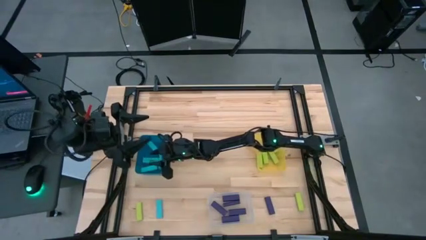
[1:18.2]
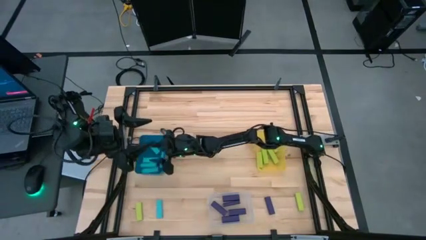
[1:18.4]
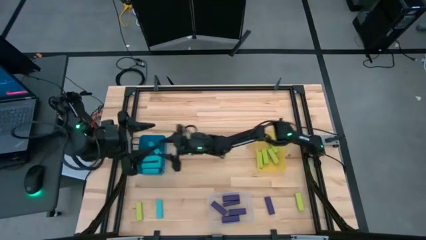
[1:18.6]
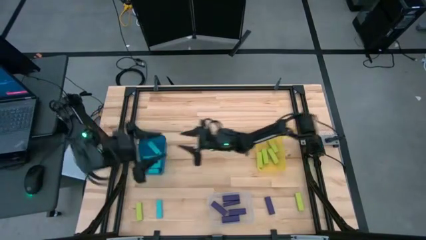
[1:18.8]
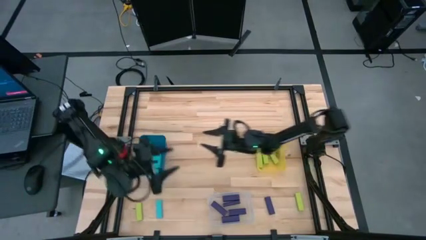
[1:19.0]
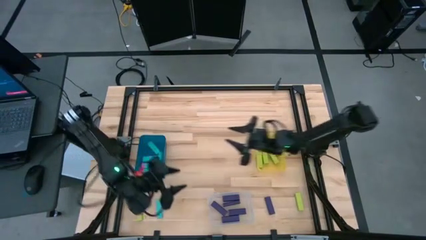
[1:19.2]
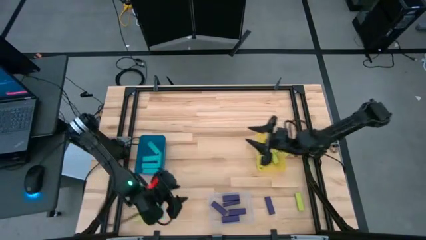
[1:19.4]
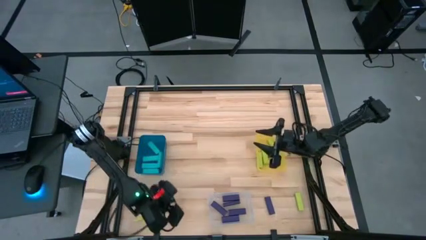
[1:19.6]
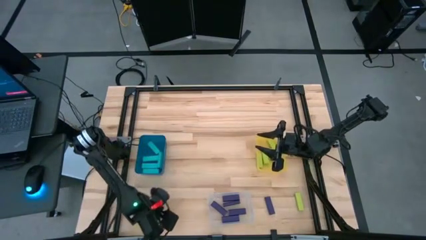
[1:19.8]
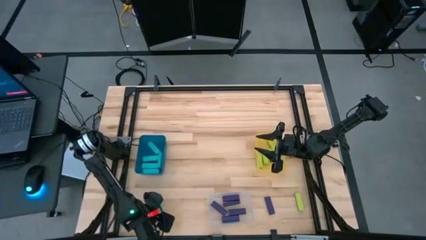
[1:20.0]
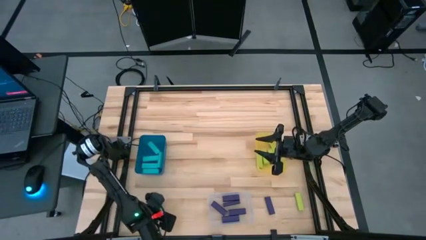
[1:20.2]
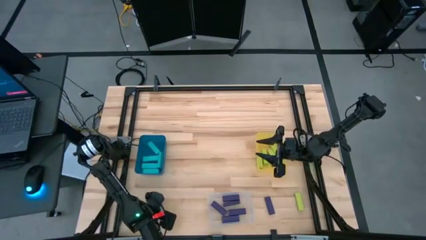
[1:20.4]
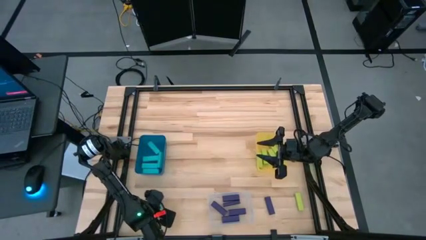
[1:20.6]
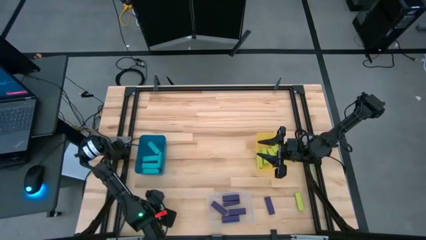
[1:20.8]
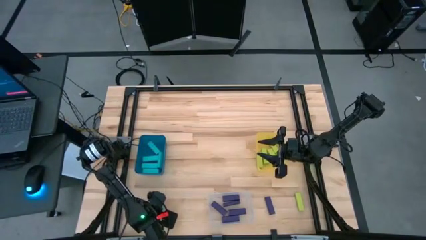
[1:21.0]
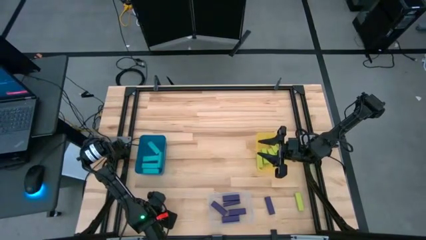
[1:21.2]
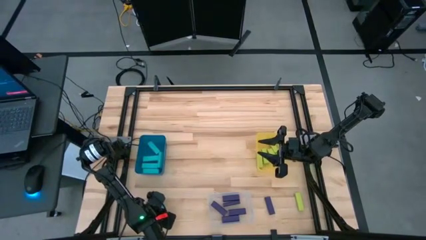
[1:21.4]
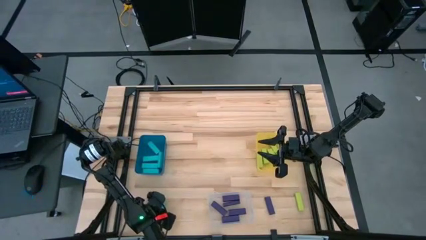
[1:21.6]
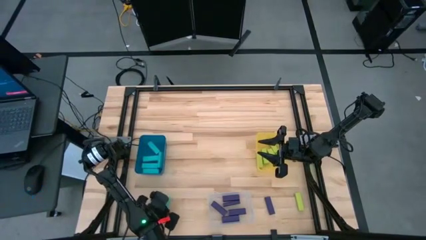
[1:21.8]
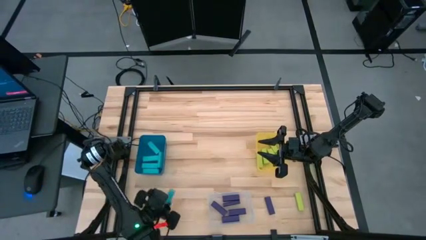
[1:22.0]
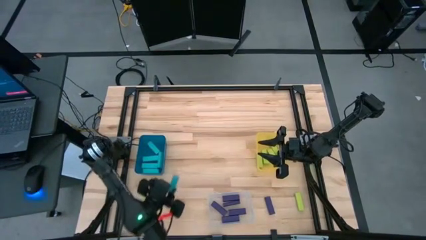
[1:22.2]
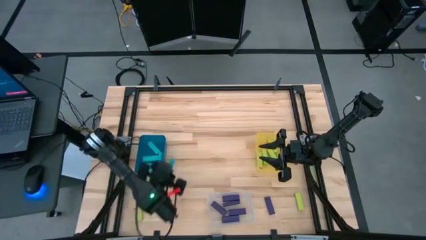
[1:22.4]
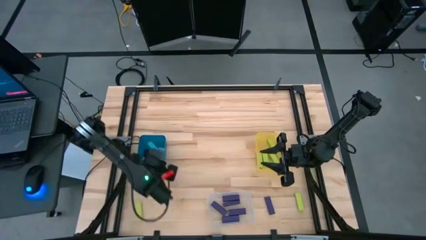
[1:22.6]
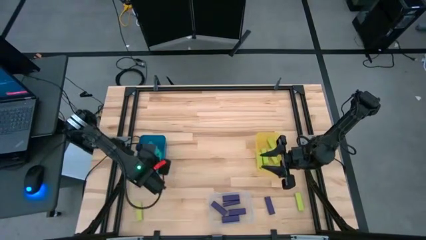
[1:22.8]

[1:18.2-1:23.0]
Task: Sort blocks
Put the light blue block into the blue bin

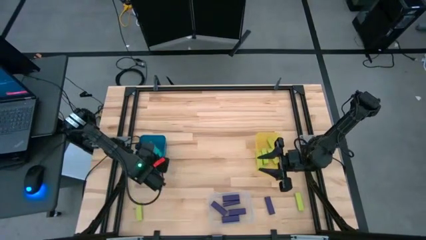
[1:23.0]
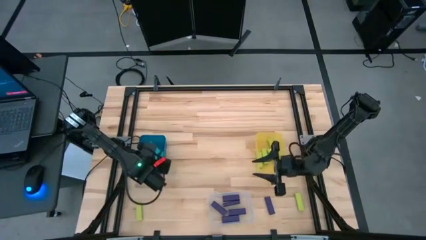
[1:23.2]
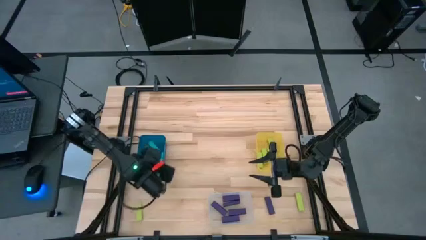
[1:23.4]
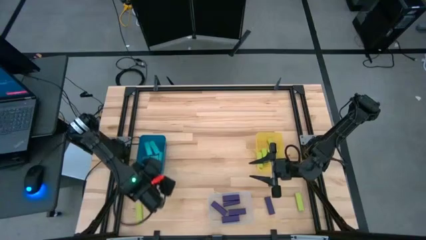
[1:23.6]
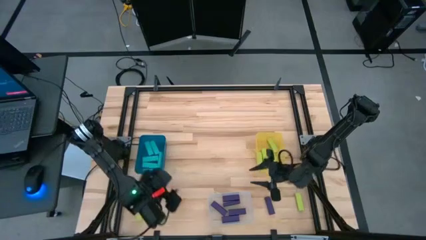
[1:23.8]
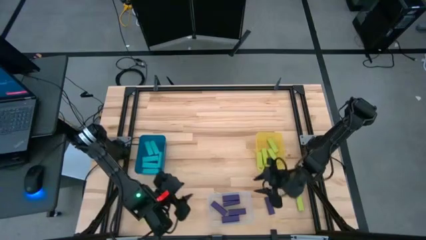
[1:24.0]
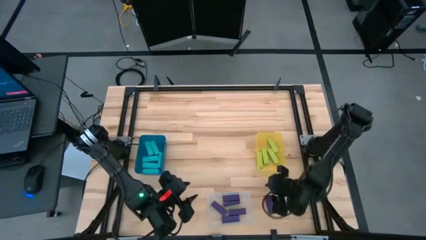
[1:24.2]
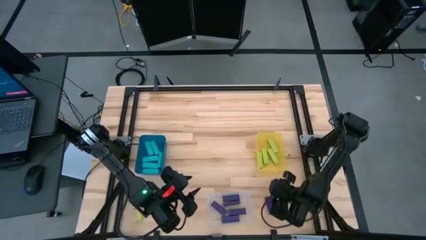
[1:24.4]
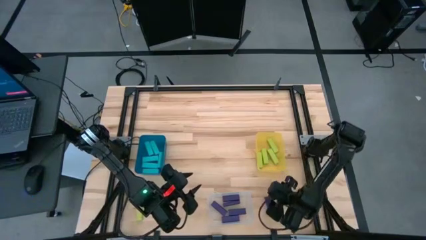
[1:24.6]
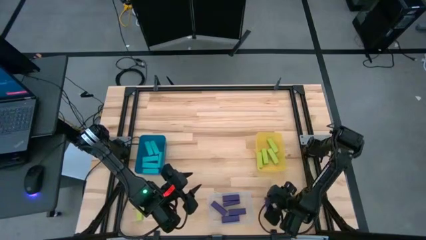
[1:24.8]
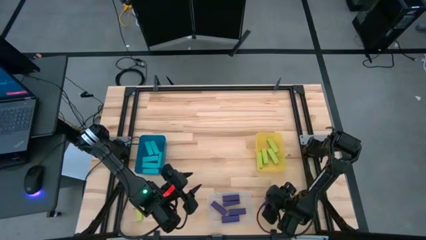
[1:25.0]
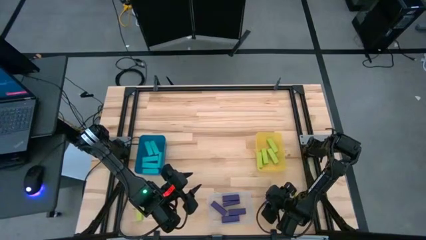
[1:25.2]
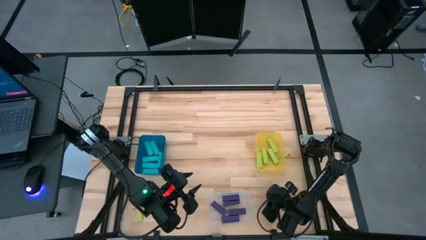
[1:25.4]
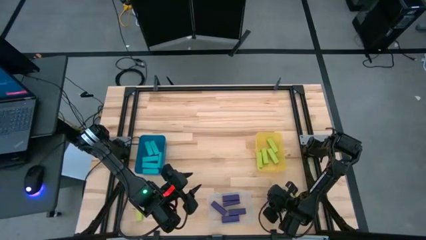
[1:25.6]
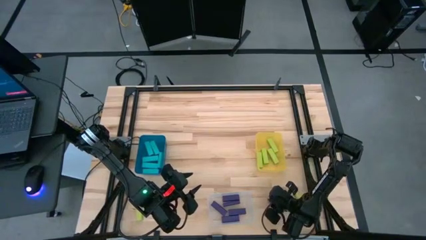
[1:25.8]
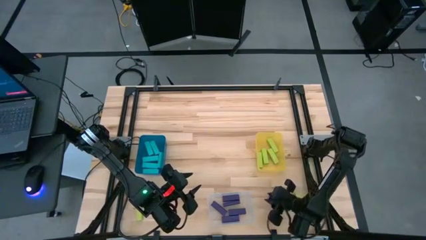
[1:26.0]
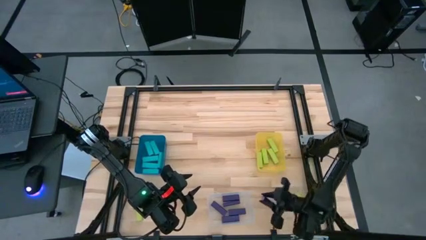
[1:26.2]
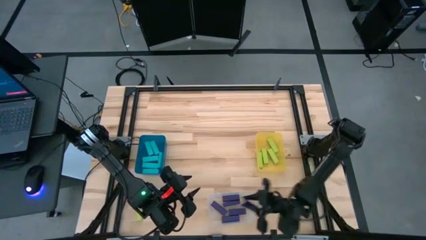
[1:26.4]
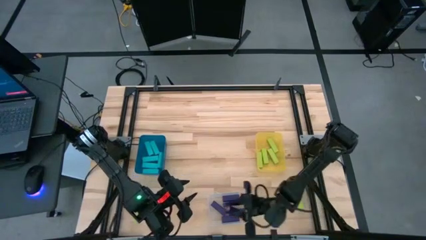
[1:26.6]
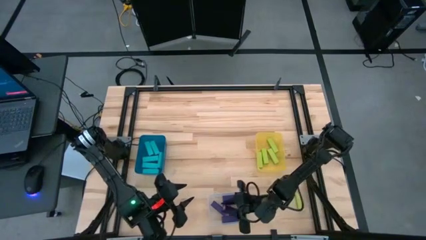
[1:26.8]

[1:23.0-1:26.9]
Put the violet block into the transparent bin

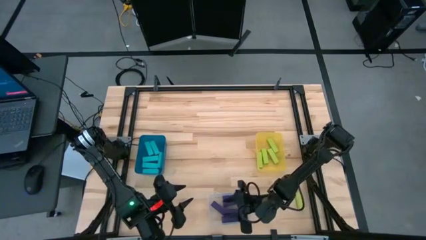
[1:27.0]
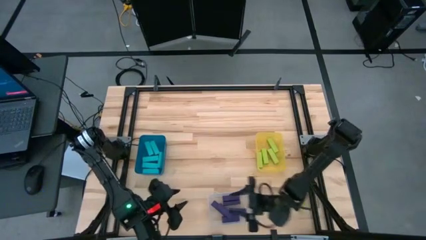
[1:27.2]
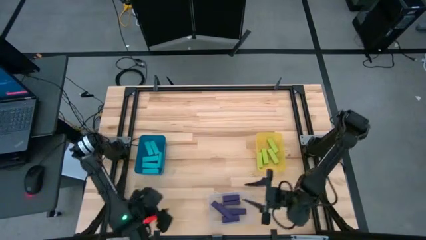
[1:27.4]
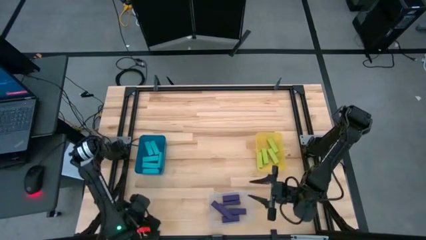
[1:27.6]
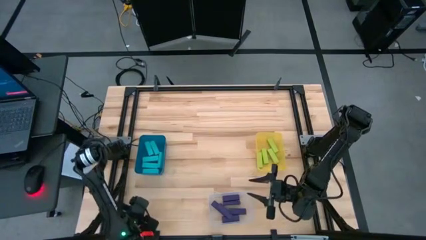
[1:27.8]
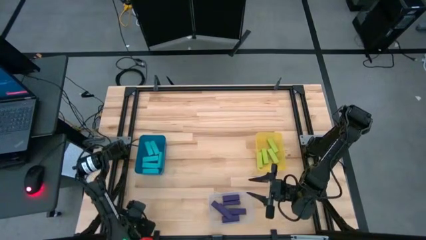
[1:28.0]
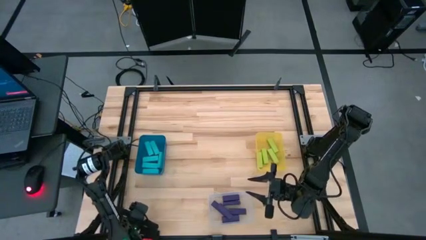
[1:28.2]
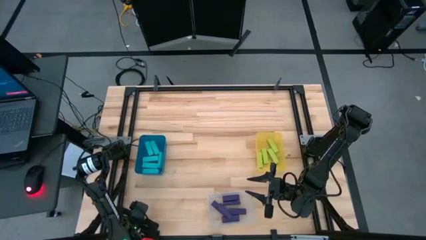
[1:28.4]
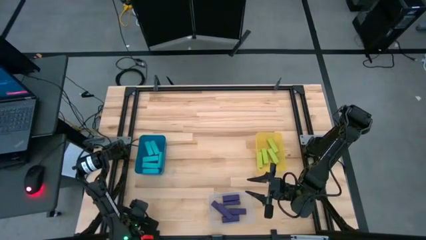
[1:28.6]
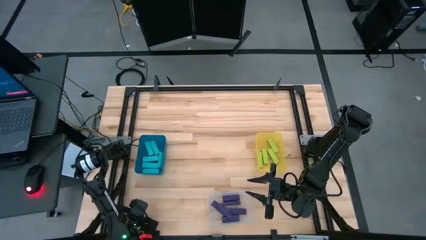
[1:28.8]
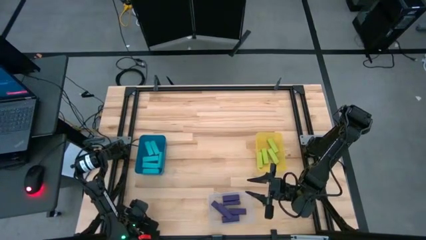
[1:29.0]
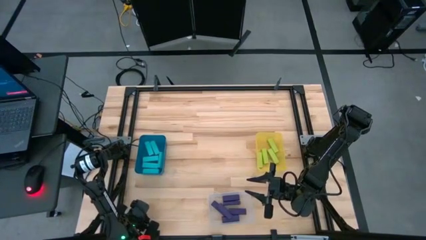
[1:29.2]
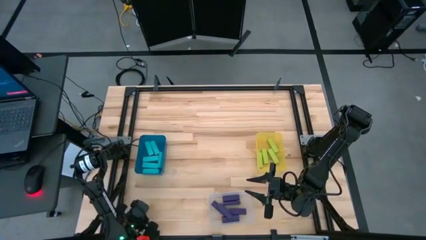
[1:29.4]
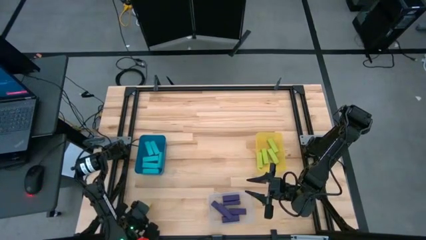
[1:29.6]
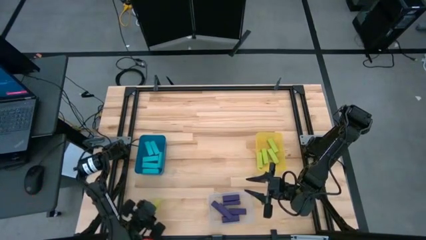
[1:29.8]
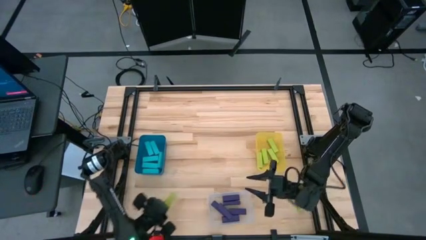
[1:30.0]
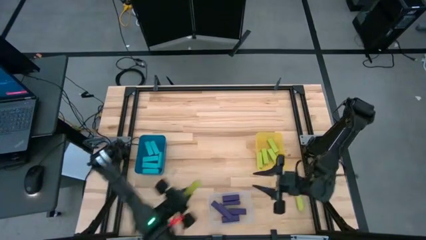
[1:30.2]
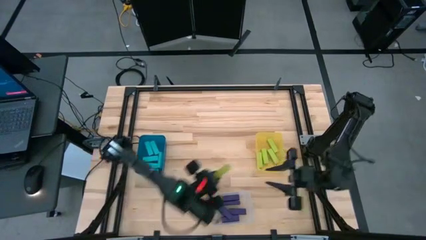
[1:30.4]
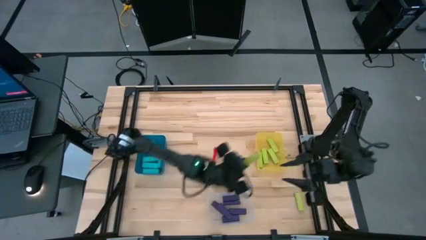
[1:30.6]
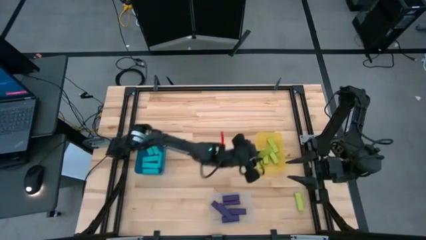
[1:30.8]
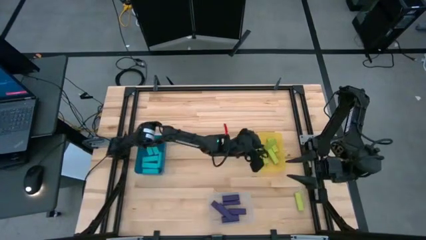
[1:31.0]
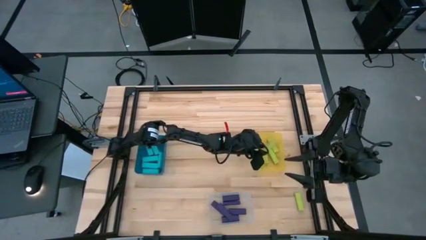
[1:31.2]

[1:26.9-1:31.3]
Put the green block into the yellow bin

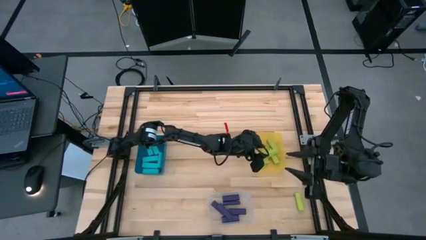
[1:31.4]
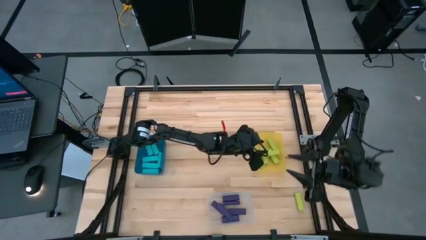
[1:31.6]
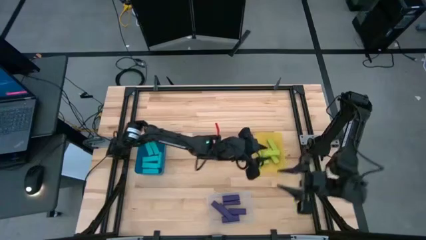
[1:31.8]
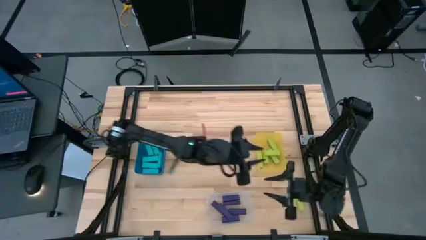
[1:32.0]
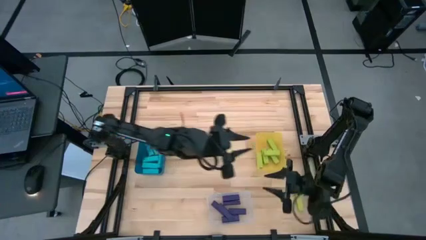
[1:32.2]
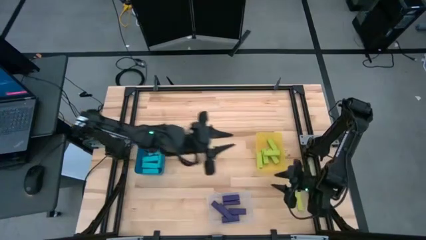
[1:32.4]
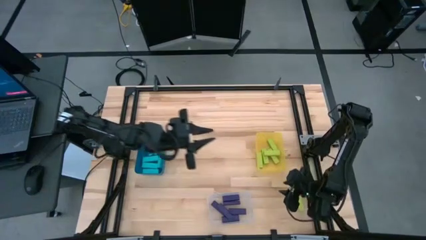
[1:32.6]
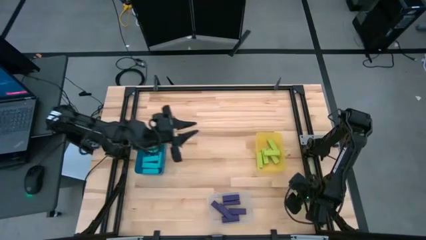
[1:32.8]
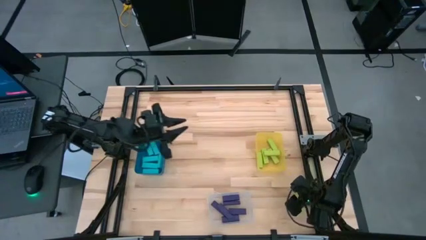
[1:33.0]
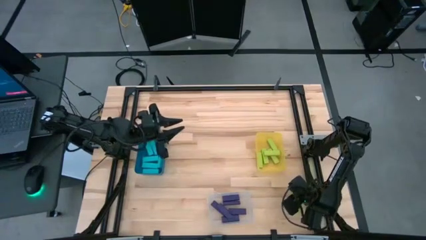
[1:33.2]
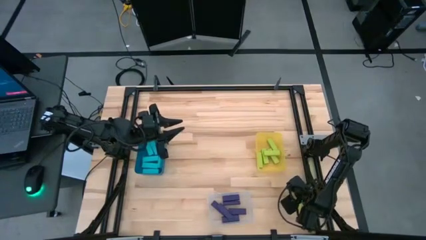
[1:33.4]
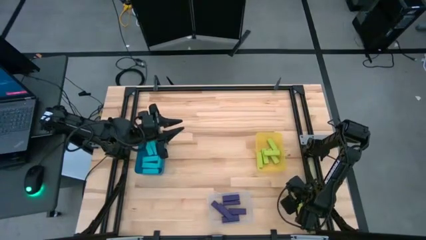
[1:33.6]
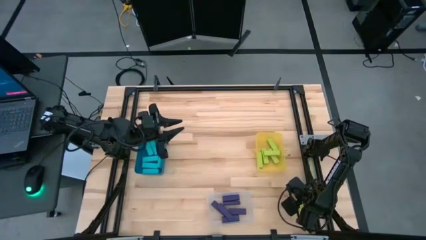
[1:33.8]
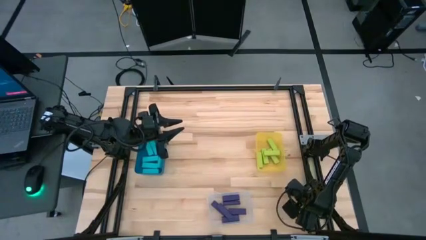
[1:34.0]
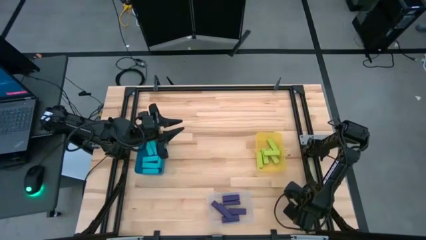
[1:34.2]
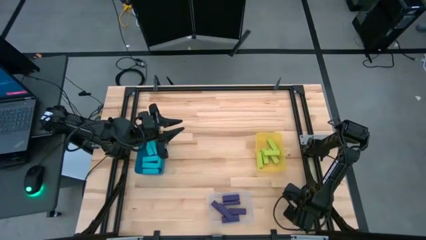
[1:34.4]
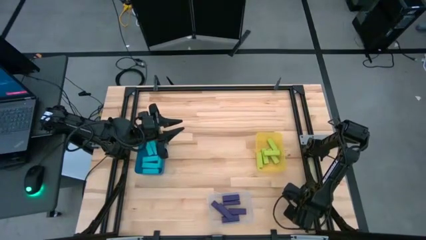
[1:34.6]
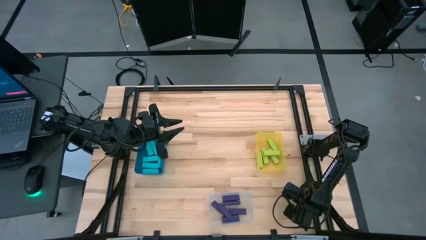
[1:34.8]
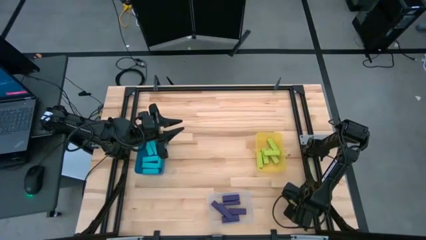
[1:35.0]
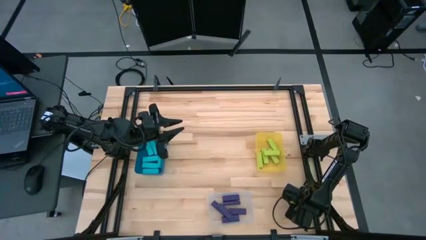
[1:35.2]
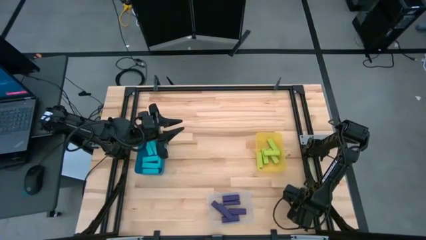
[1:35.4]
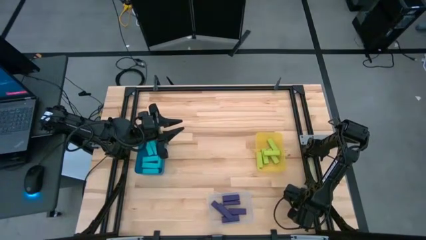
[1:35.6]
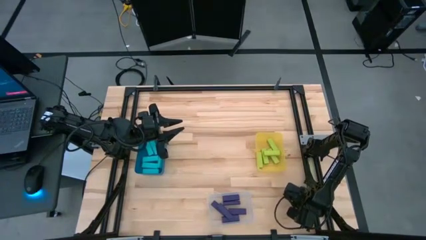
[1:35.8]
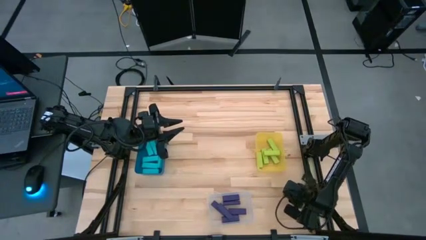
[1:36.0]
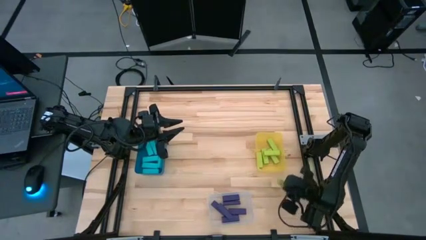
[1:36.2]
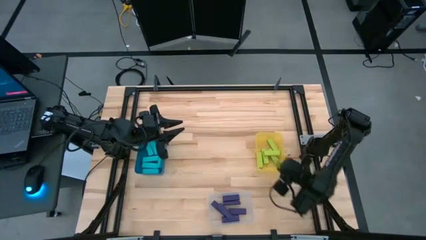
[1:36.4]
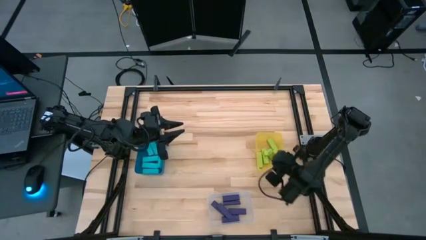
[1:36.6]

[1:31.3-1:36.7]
Put the green block into the yellow bin
